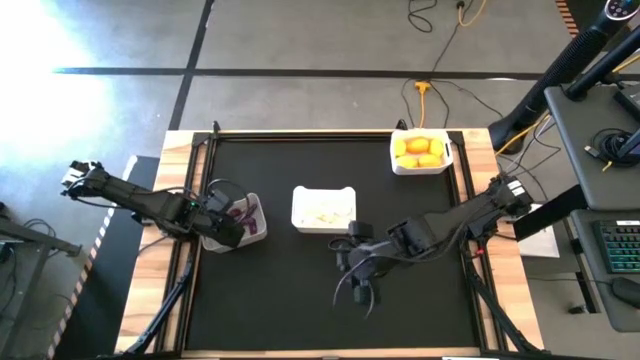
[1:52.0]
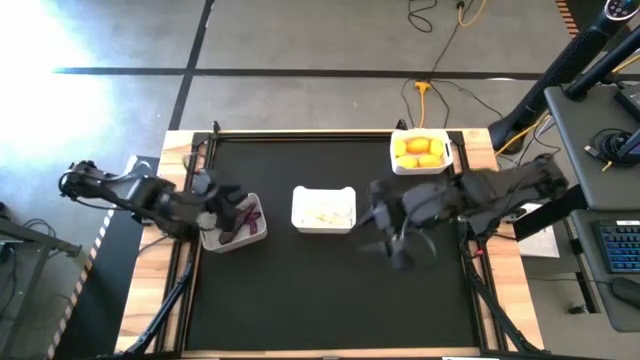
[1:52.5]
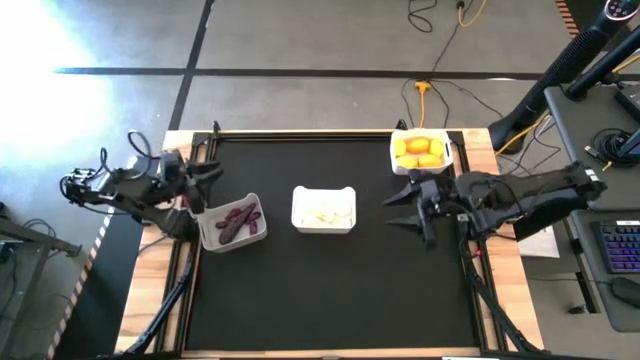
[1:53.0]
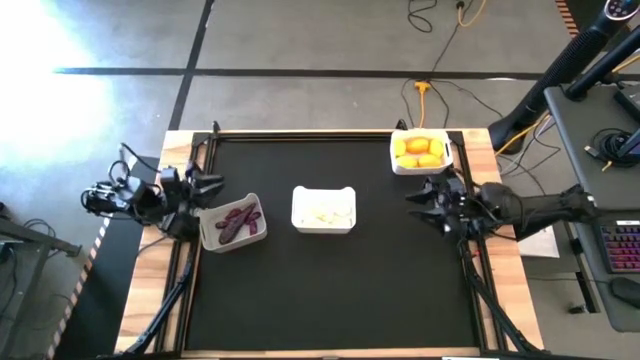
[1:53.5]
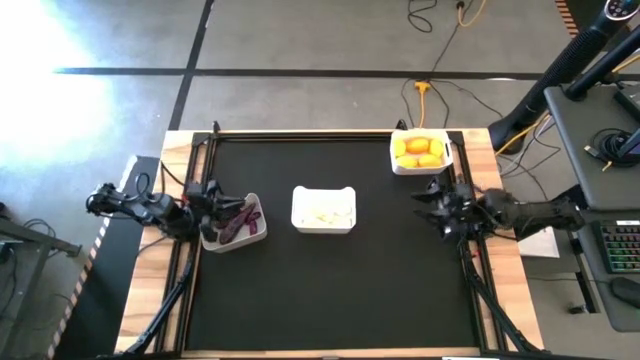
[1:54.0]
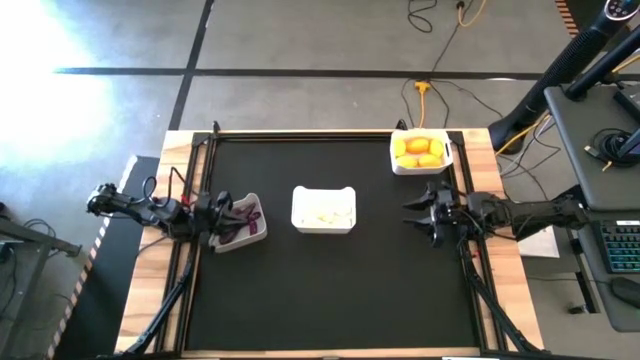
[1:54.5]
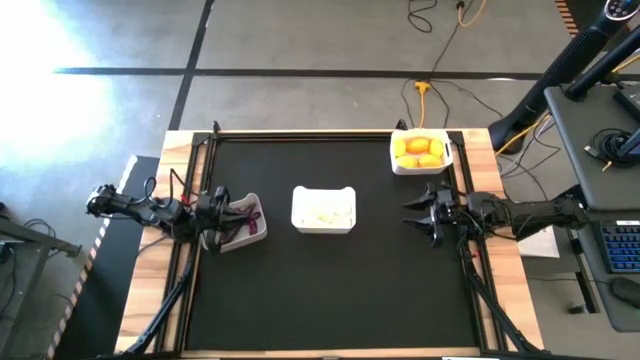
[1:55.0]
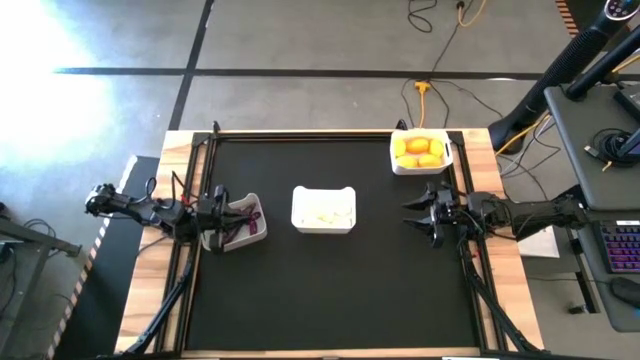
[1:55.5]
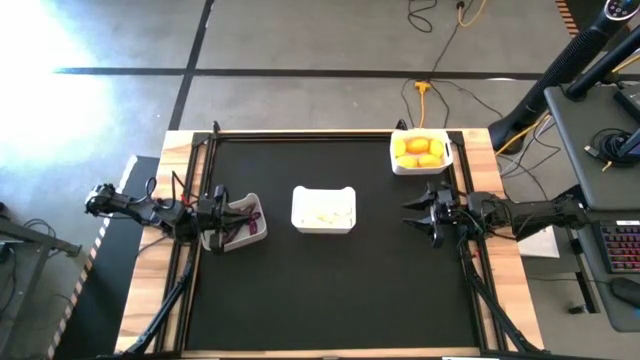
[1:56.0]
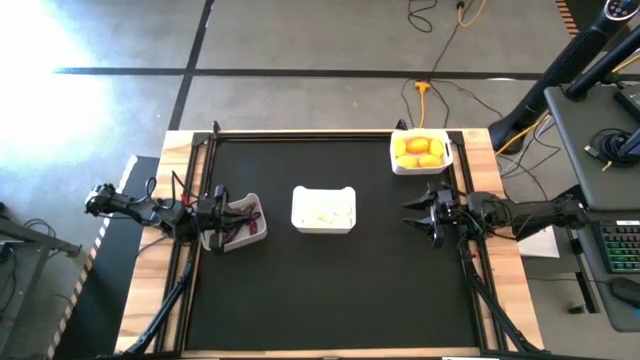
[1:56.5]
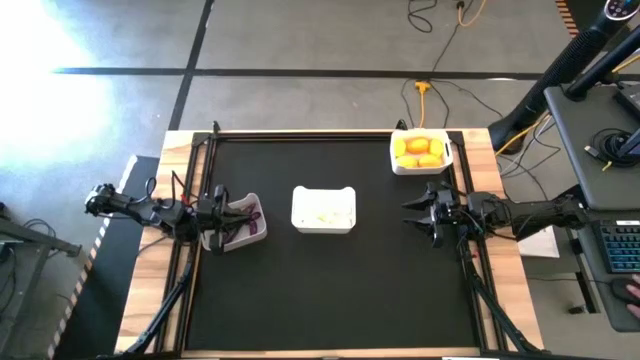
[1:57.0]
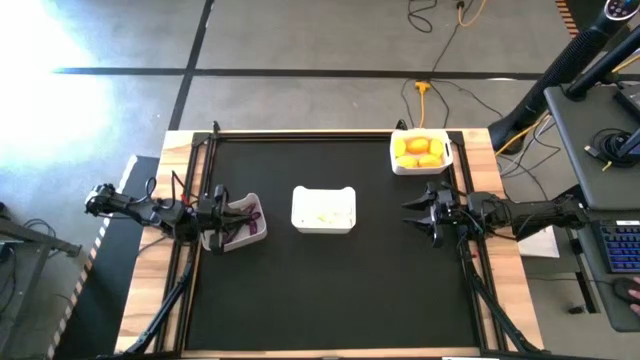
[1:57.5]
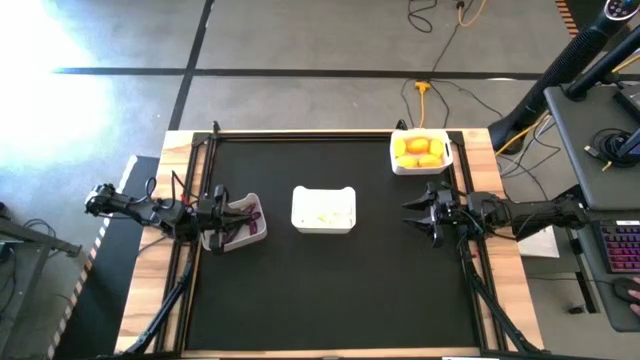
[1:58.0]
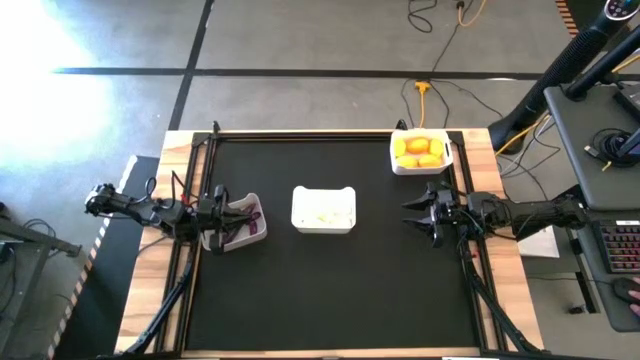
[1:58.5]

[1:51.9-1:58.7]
Task: Sort produce into baskets
Return to Home Position

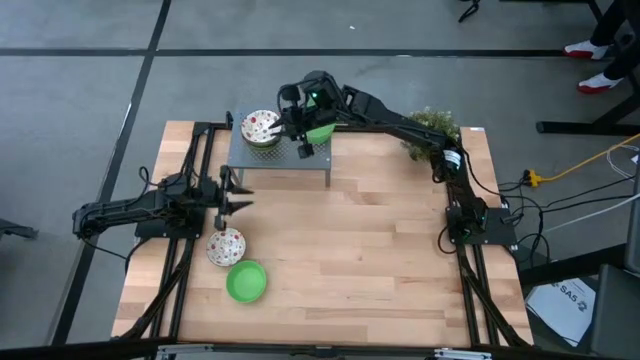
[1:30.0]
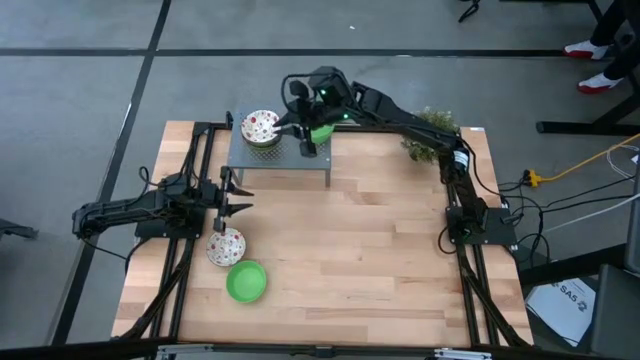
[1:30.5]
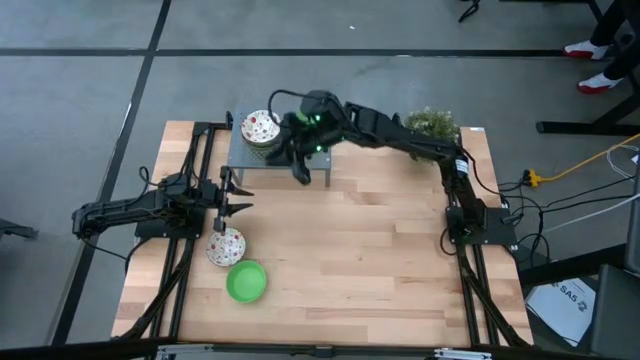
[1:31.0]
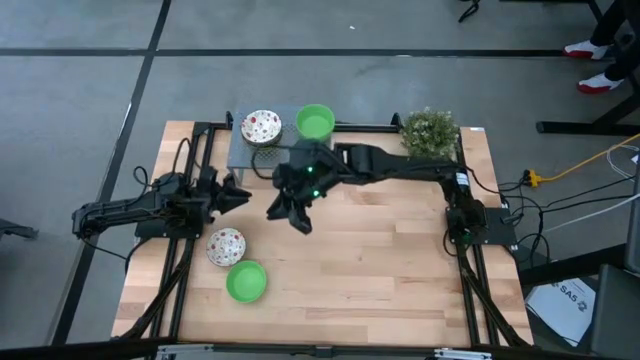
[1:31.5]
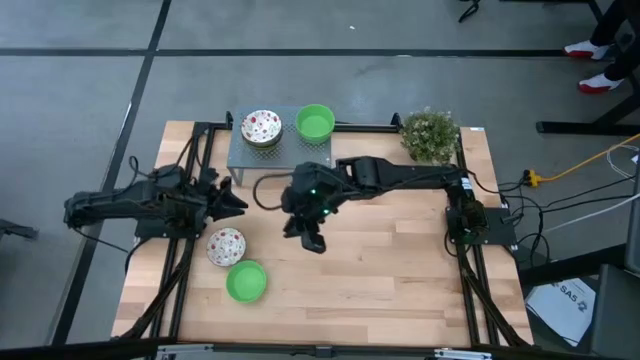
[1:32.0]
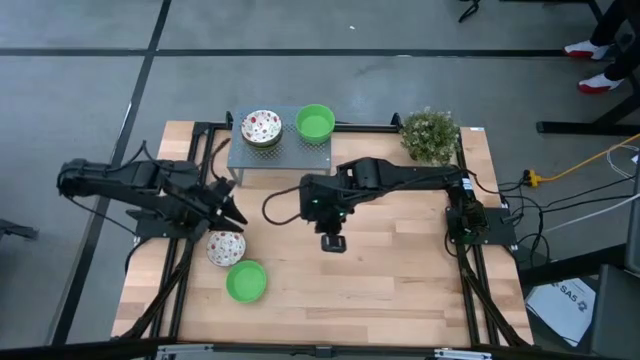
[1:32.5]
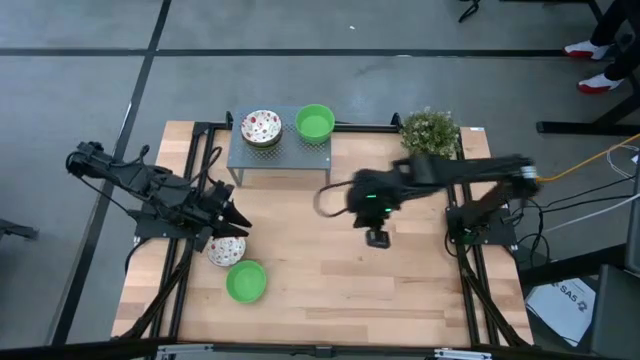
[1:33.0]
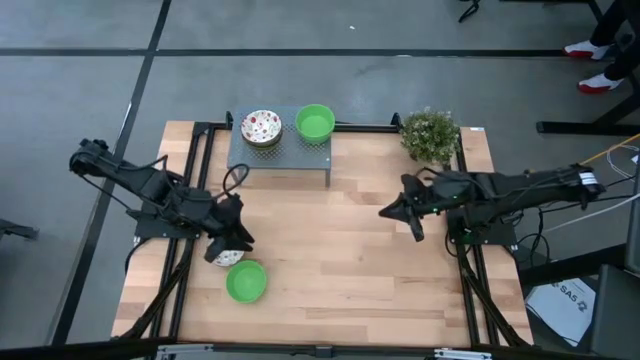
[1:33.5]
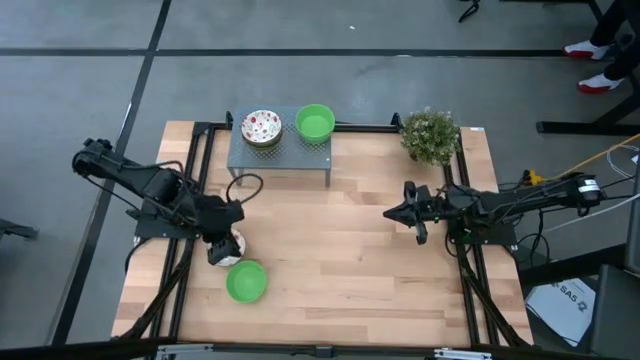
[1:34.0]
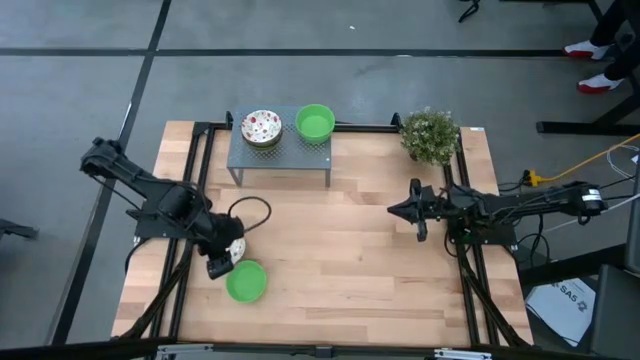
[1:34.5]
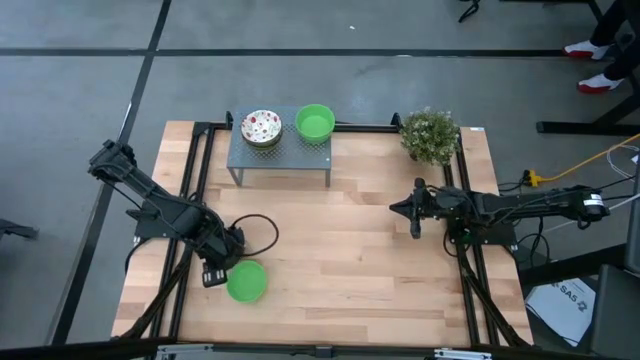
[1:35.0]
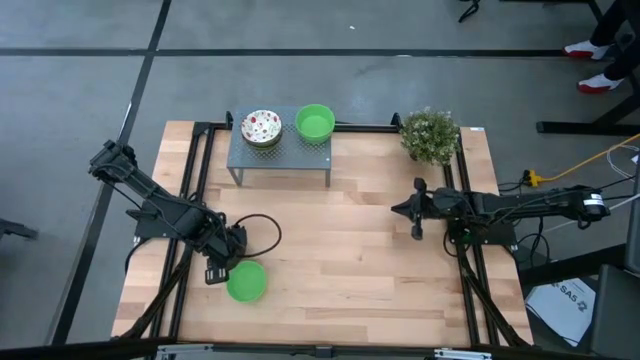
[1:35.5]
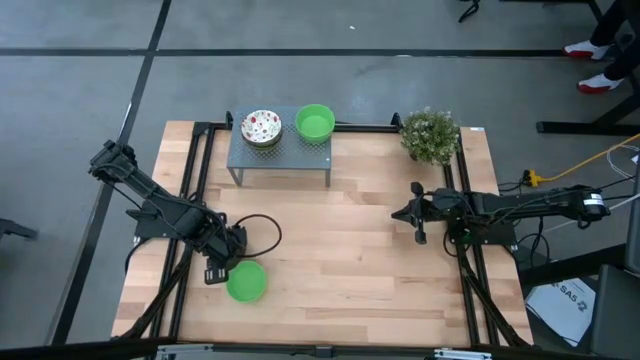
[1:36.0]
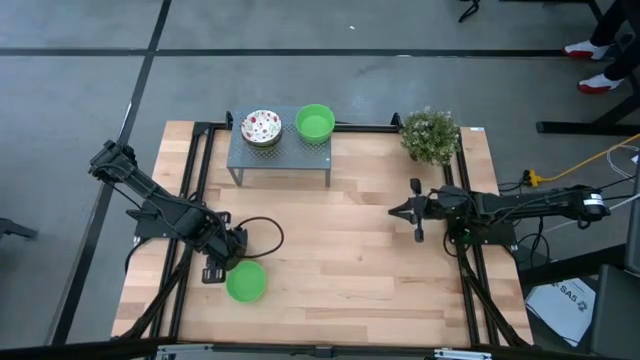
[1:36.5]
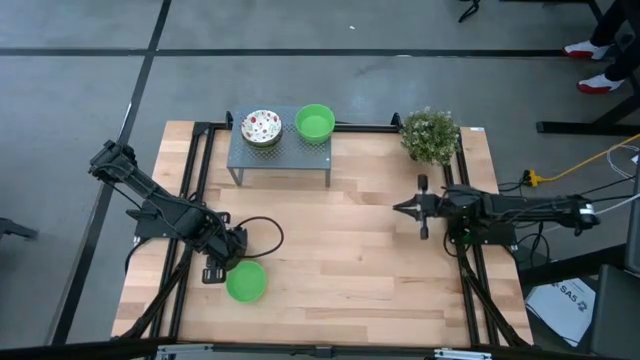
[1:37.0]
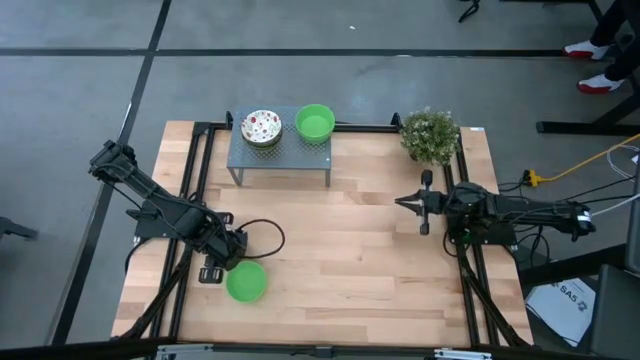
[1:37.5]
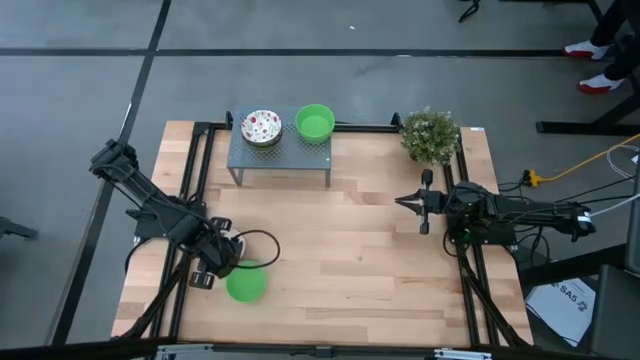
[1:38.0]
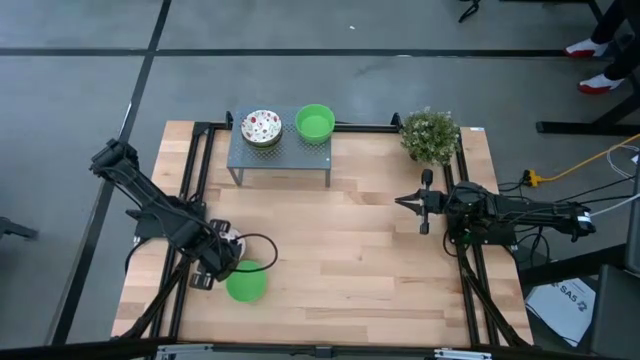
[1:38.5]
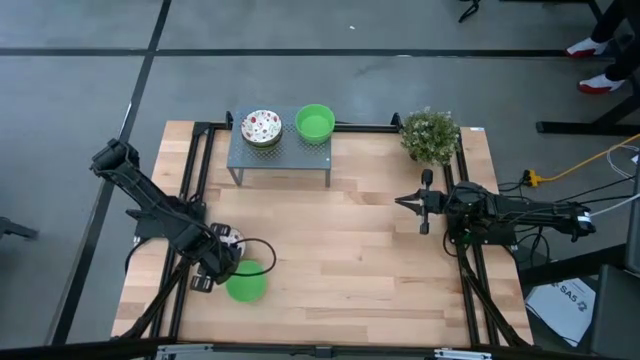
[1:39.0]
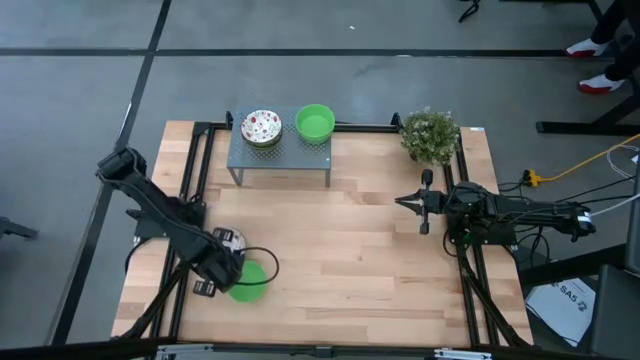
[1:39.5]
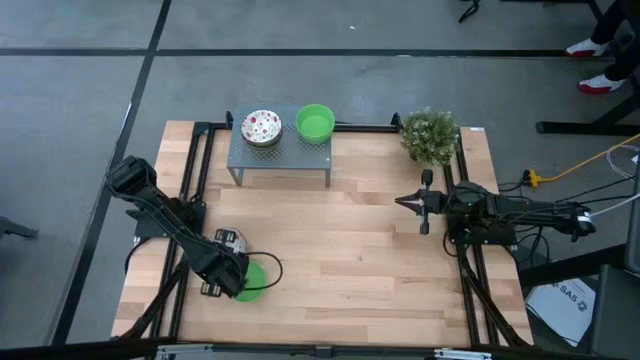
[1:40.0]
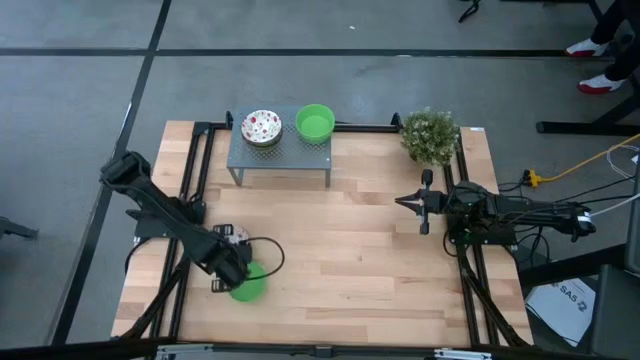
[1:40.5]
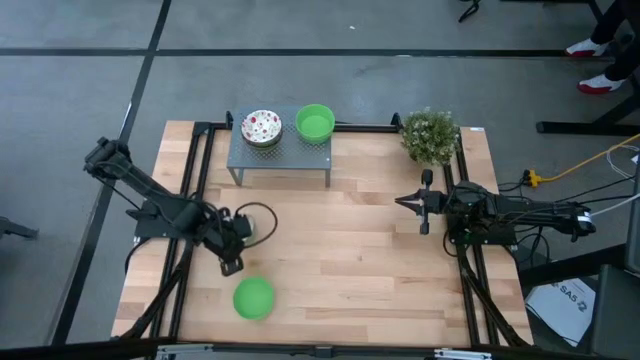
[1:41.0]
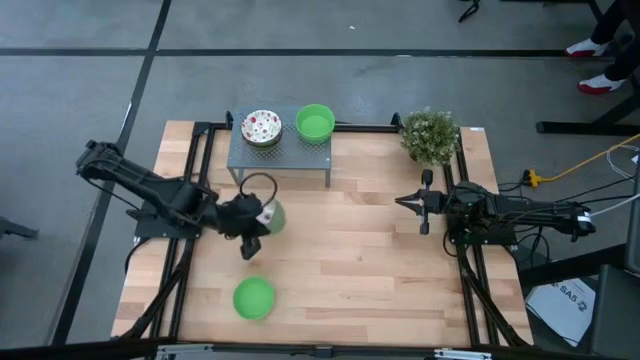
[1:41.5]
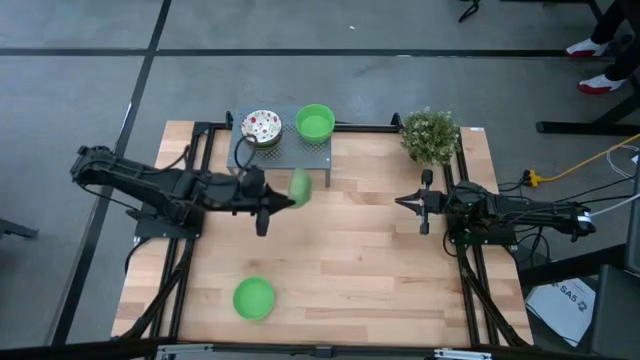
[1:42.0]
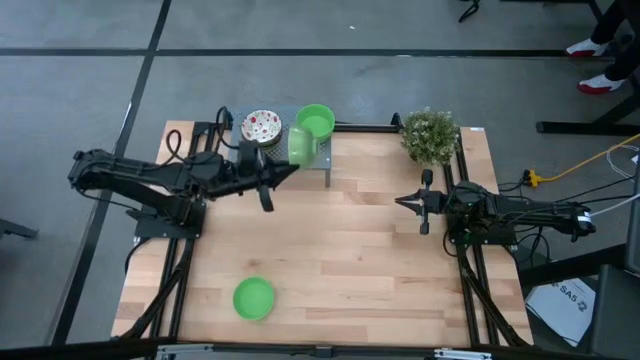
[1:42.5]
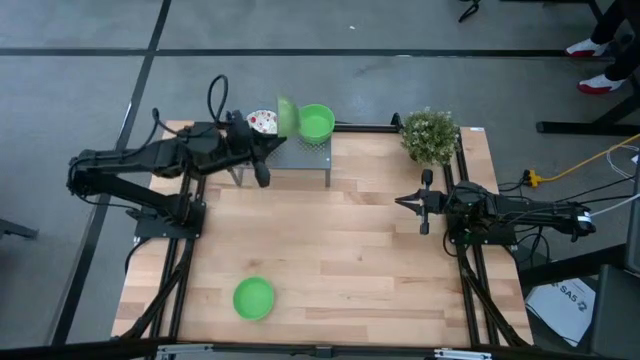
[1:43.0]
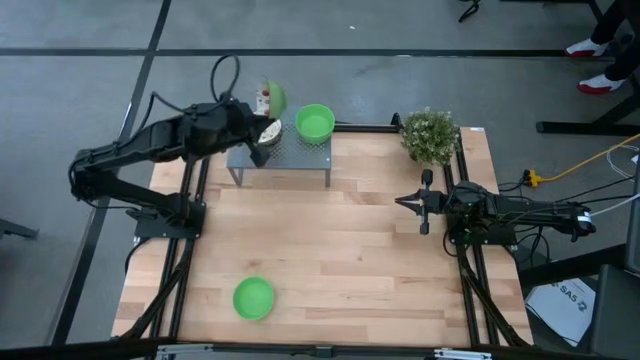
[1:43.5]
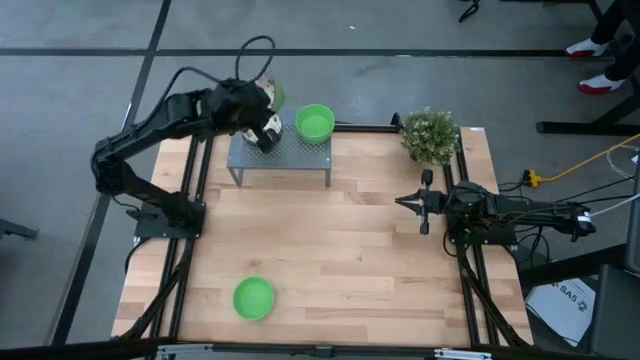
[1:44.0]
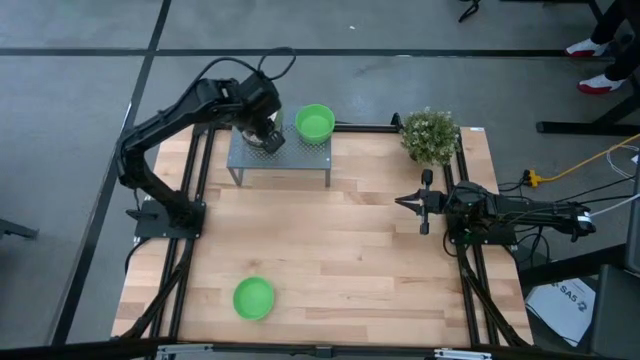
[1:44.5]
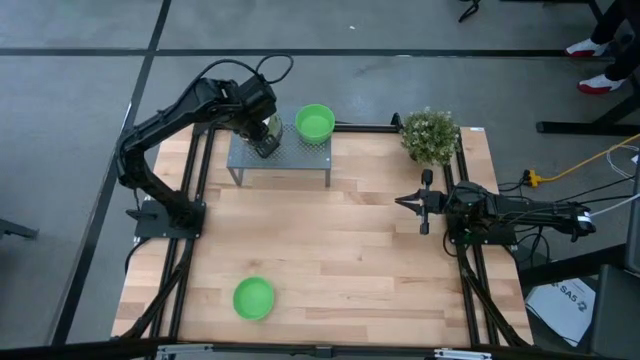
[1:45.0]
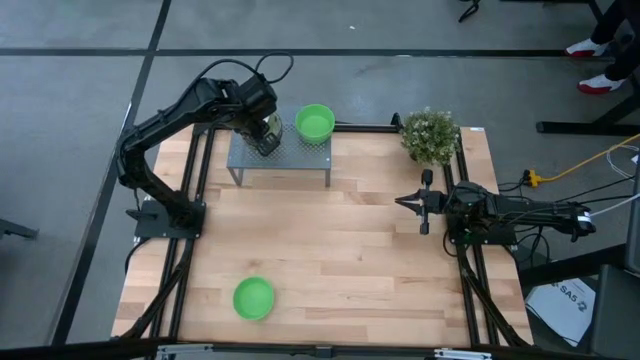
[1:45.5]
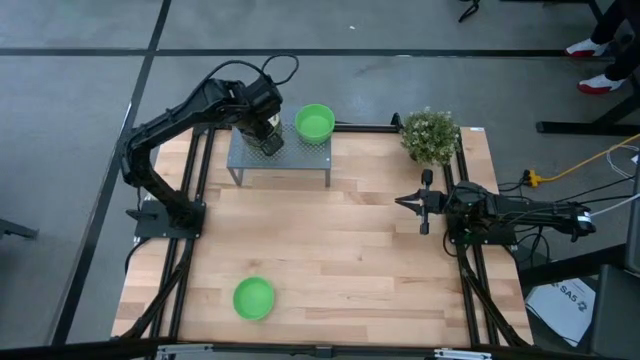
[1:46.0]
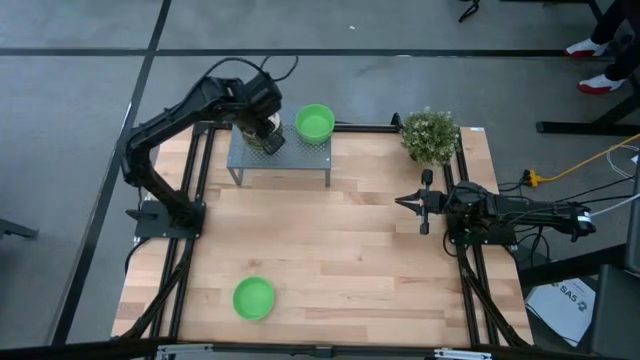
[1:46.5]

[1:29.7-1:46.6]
Task: Pick & Place Mini bowls
Stack the white bowl on top of the white bowl on the shelf
